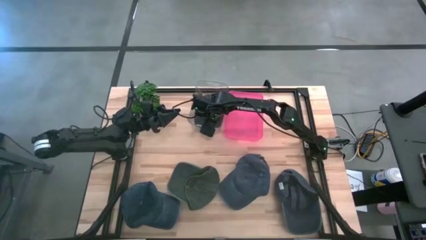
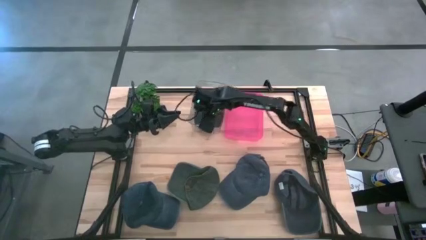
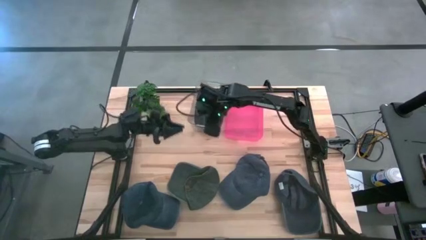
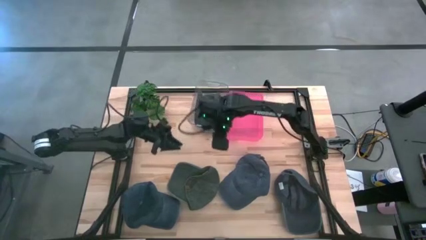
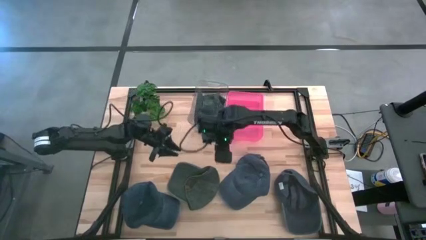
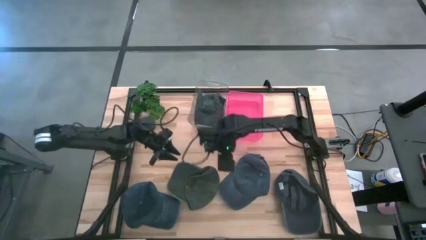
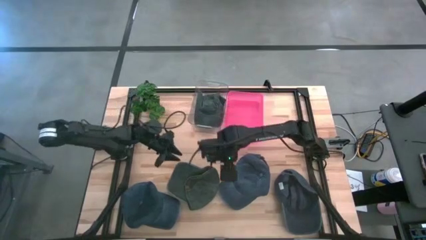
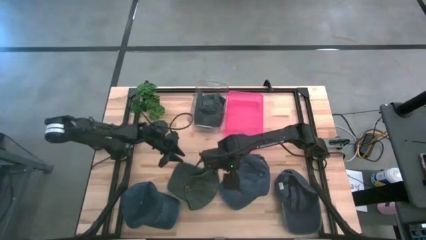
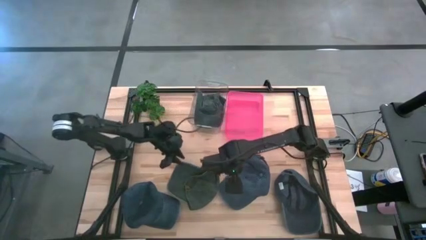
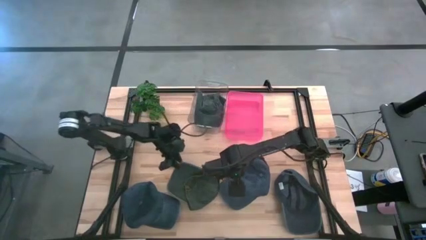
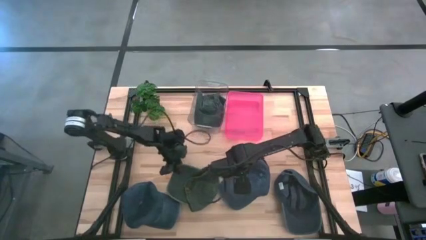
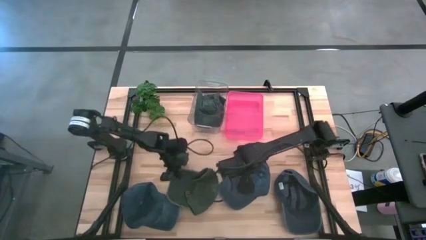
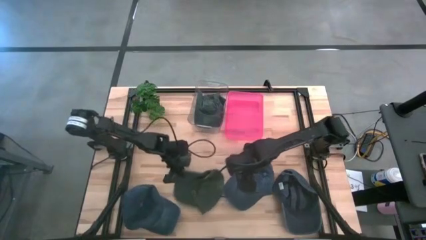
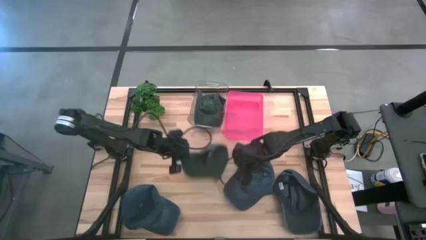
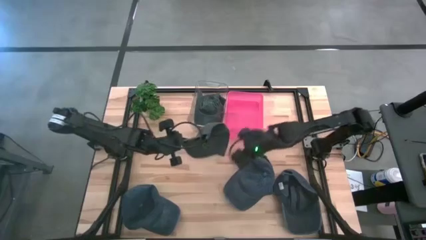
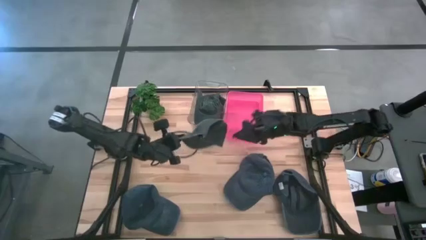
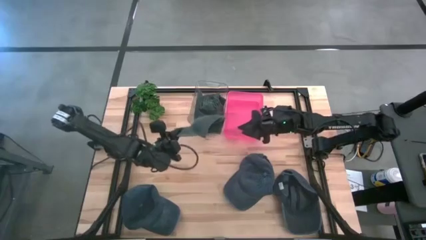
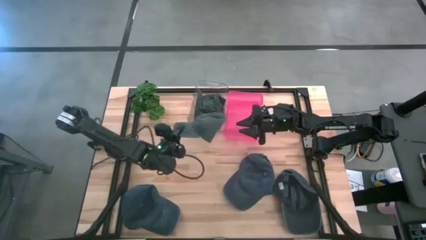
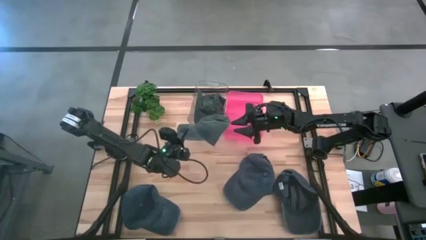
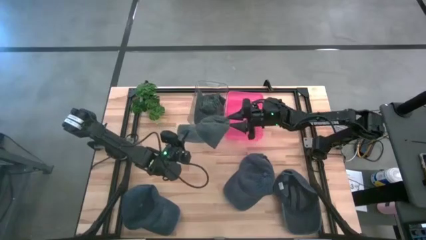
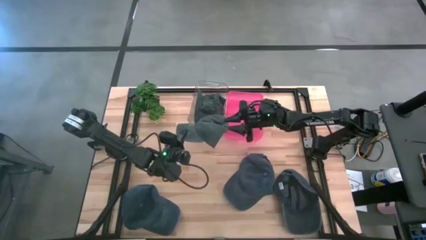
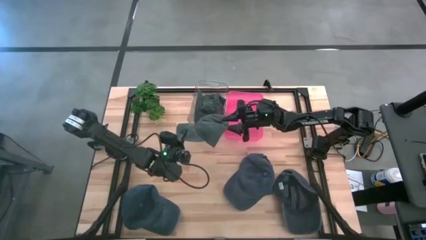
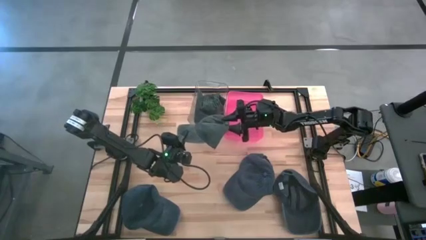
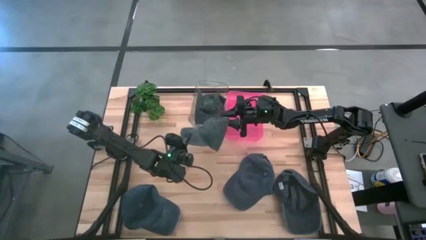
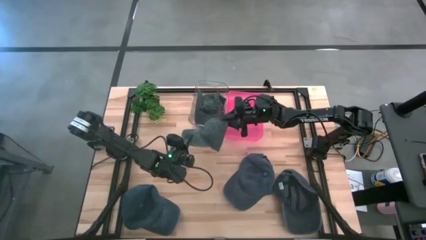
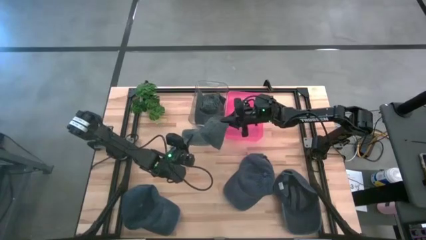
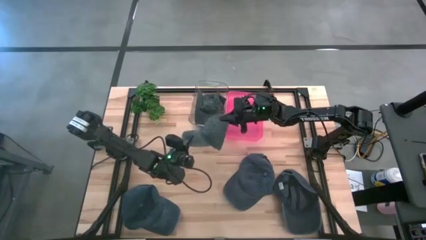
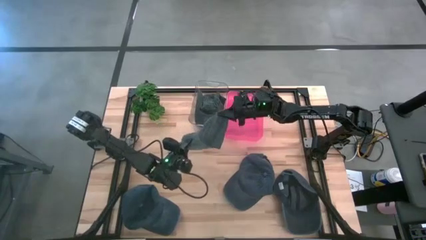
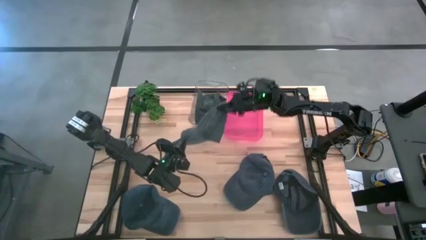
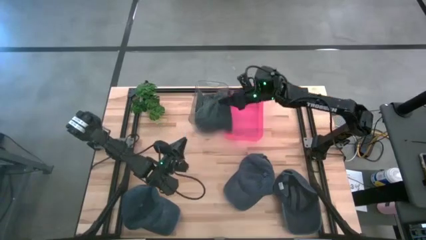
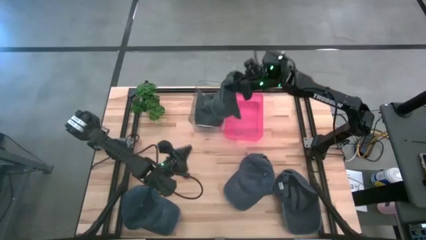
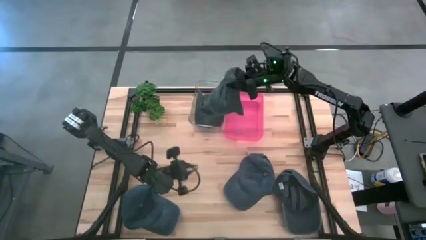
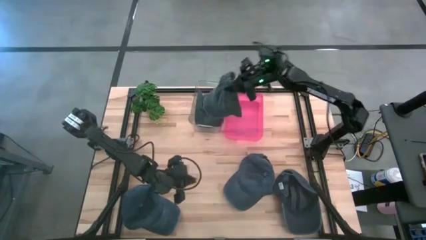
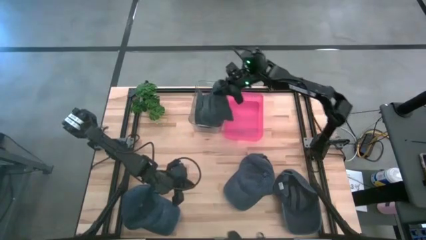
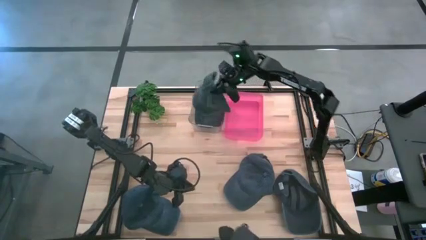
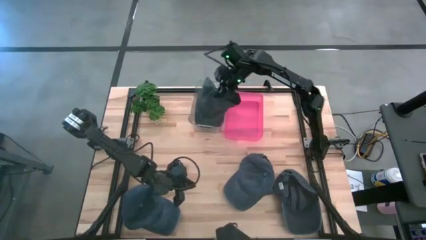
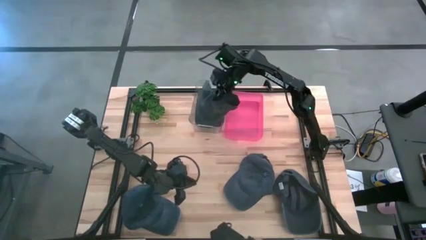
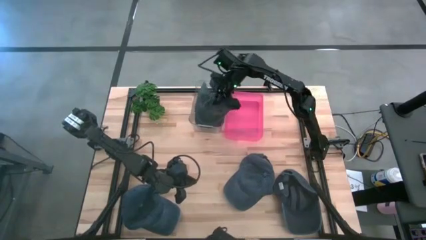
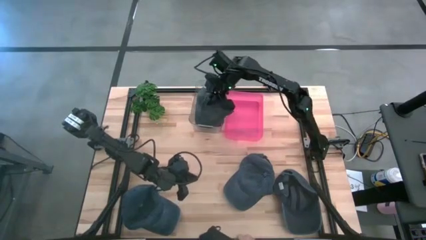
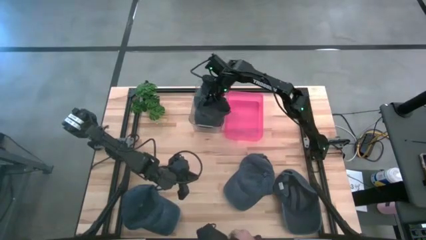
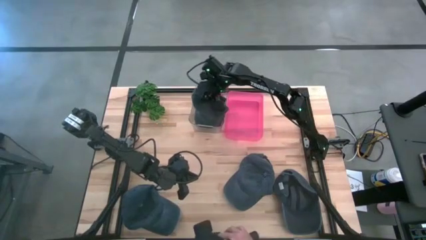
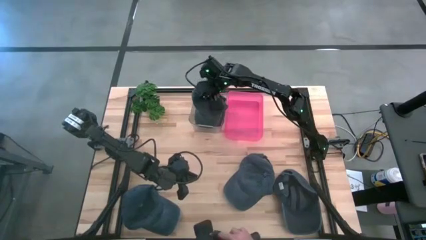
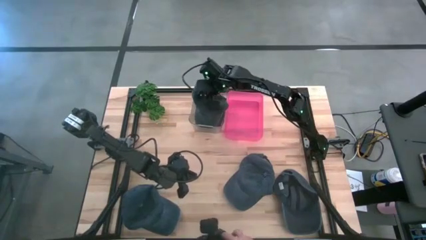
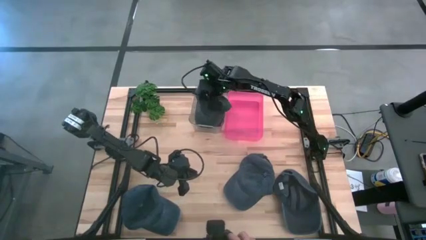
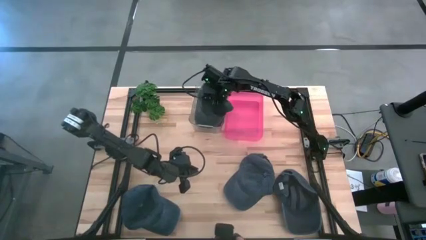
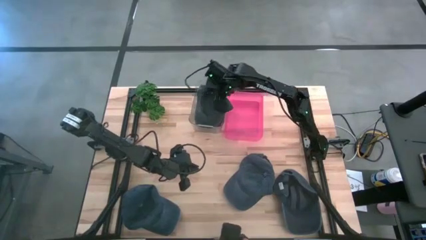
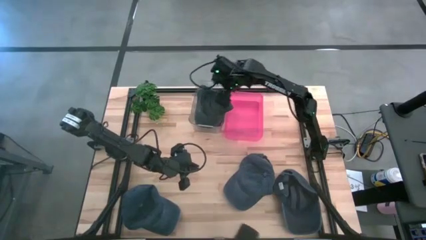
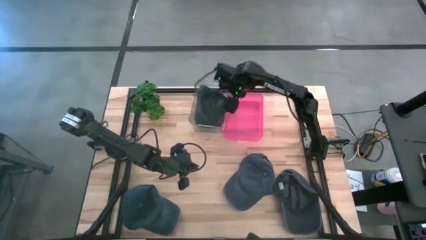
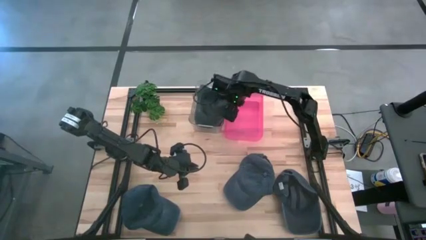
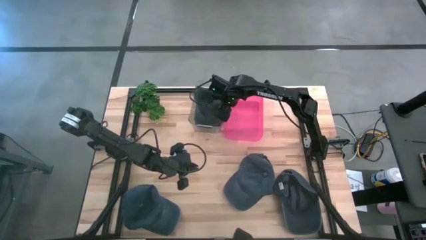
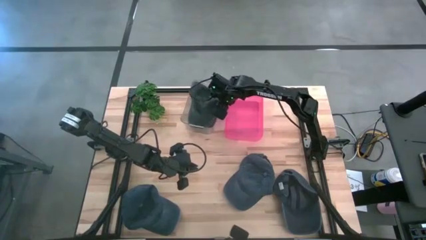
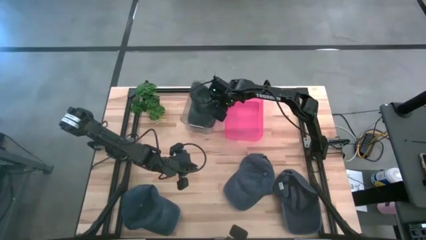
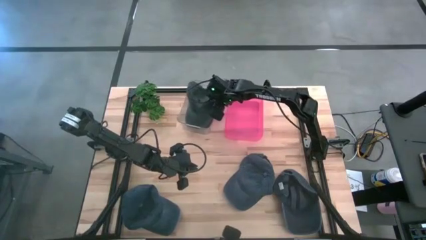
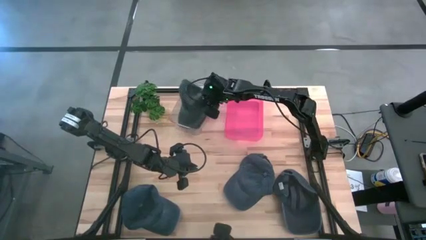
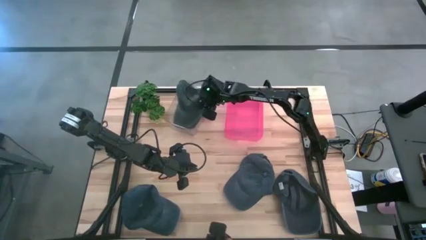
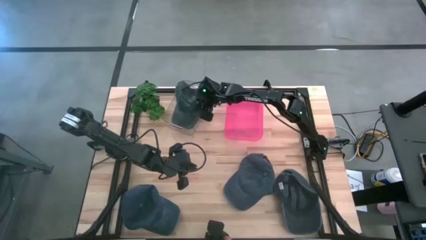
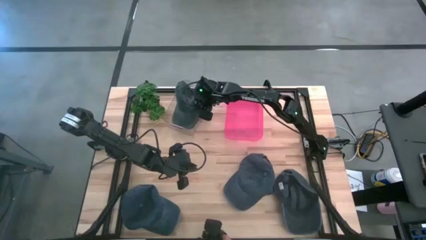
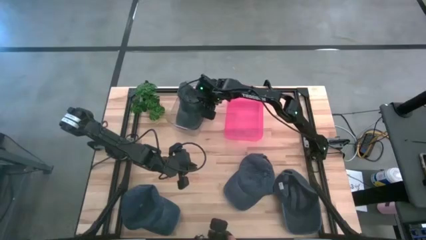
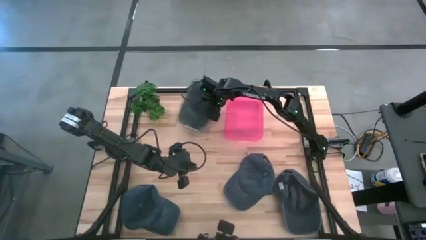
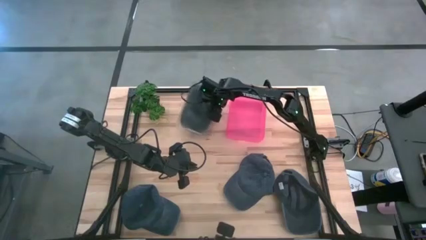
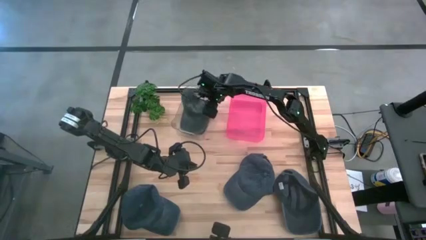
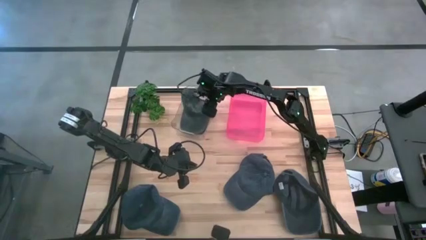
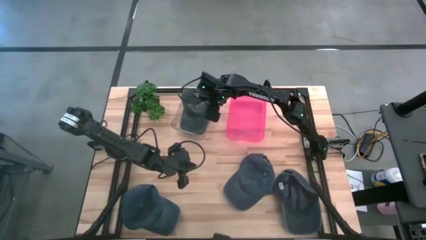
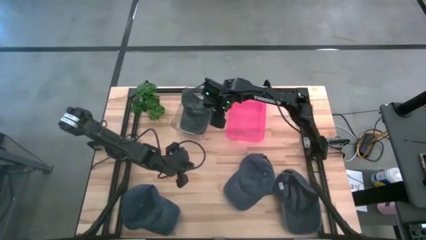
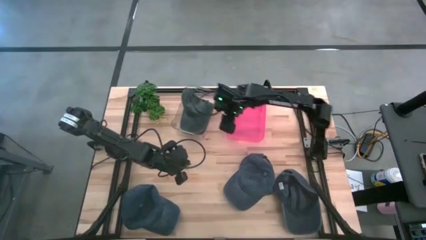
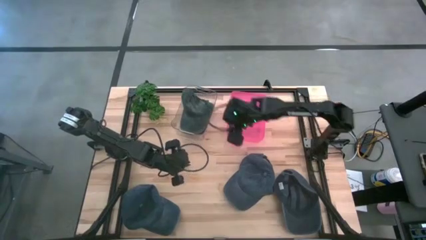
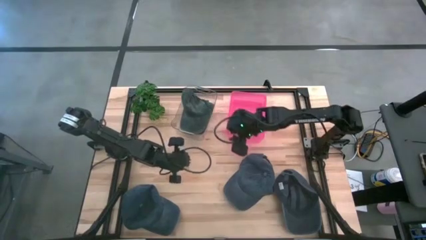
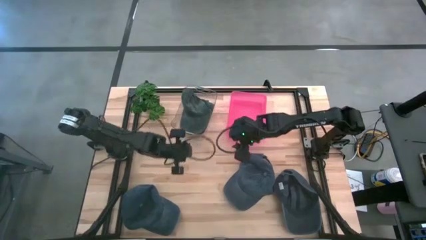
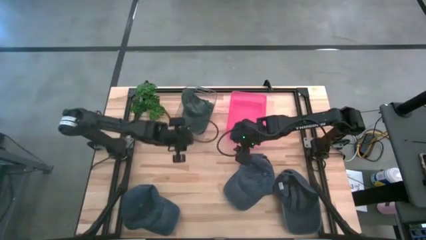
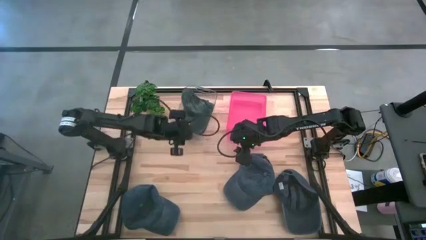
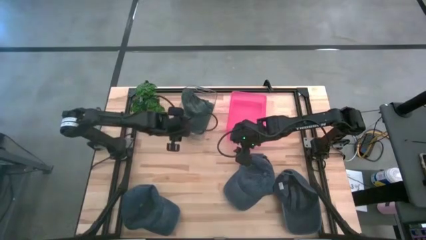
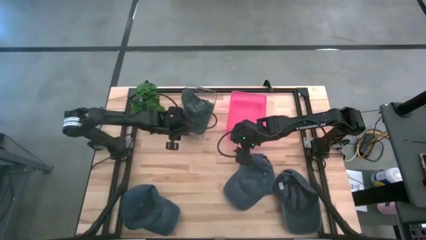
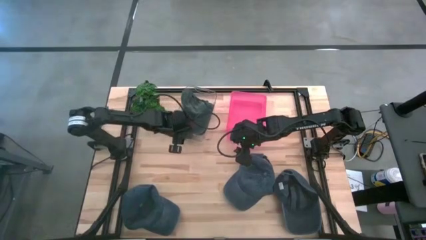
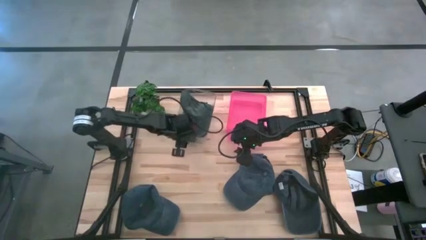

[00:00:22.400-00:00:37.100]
Task: Pick & Place hat
Put the black cap into the transparent bin
